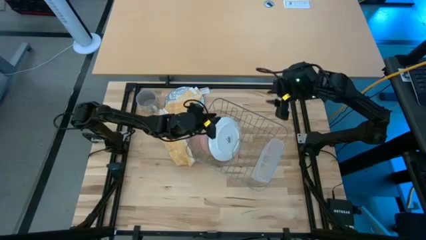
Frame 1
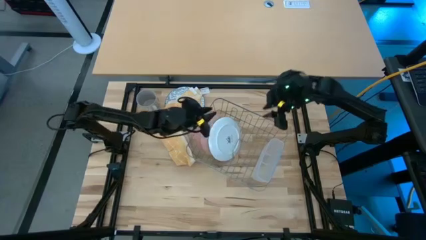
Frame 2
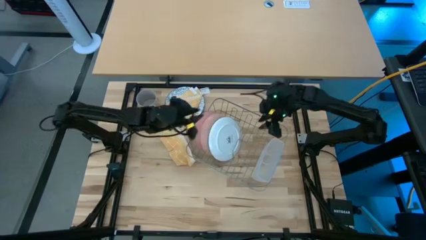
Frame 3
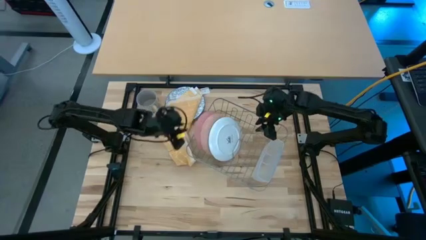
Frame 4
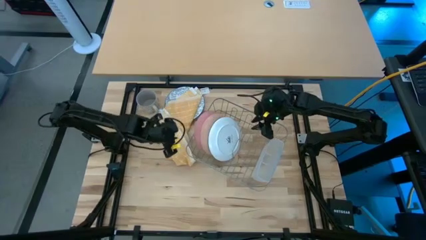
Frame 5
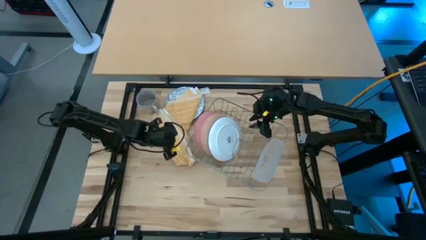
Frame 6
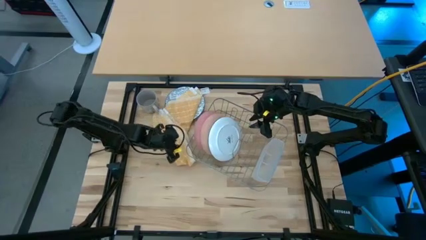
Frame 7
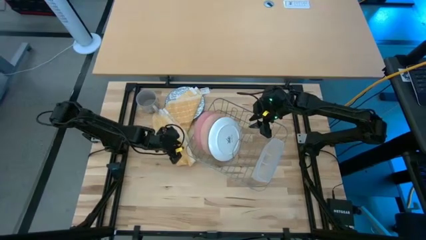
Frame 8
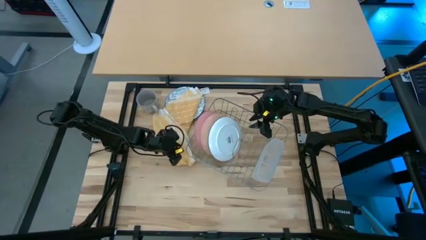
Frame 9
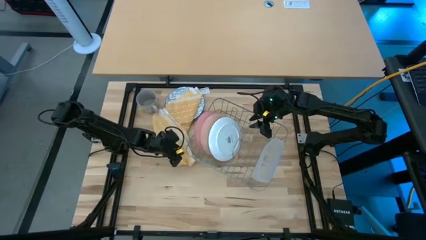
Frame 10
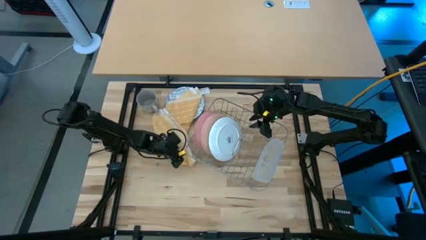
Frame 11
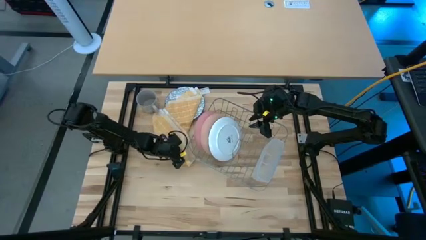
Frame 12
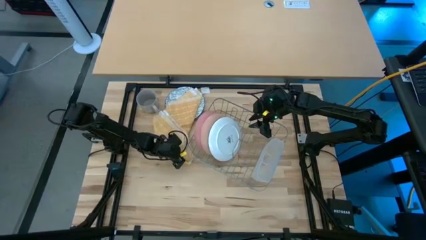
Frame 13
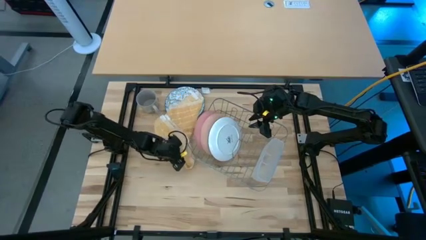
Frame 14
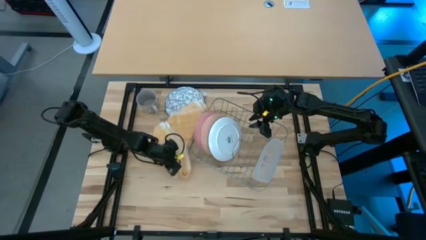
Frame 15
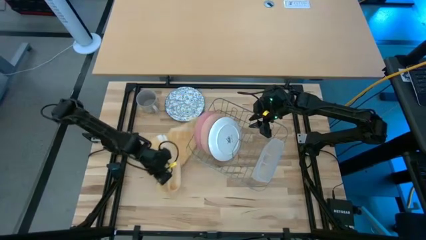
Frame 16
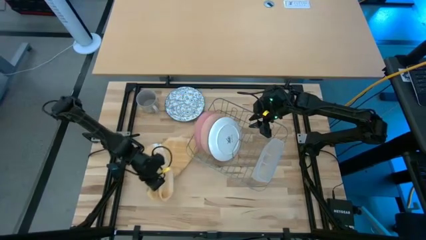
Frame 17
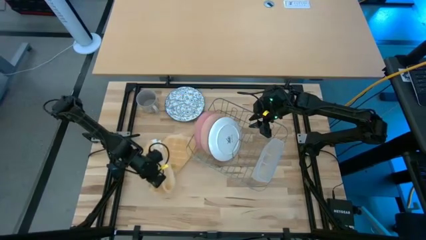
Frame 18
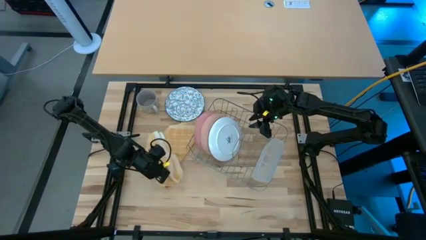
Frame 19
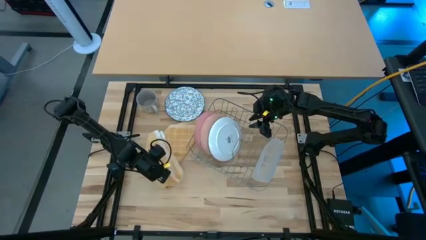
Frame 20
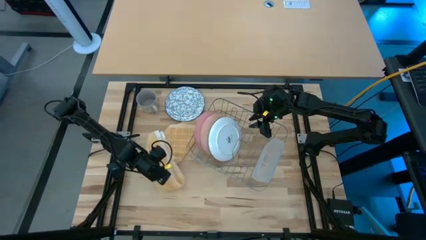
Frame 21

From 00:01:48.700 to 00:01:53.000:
Task: Sort dishes
Adjust the orange kitchen towel

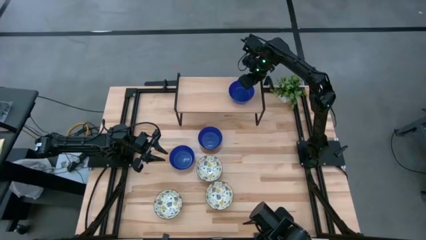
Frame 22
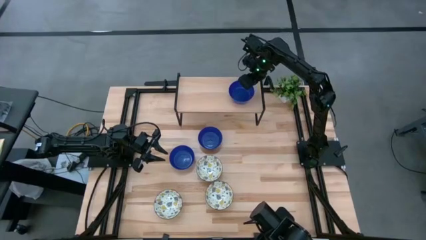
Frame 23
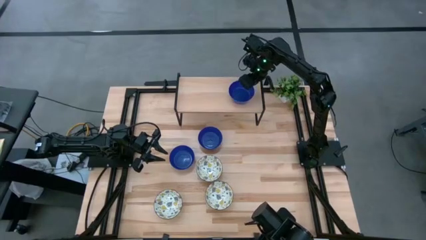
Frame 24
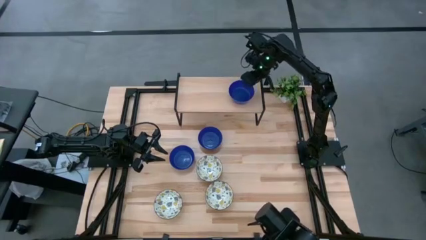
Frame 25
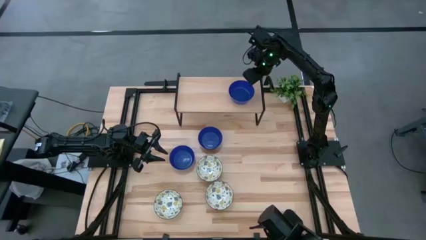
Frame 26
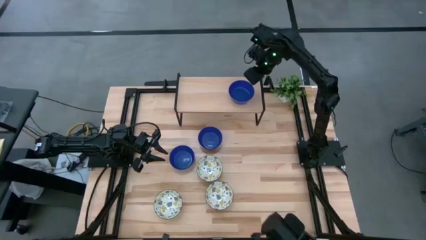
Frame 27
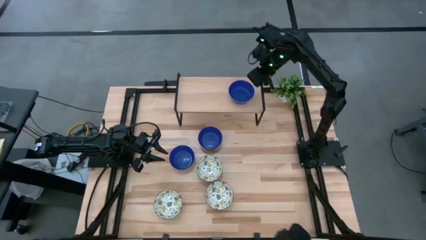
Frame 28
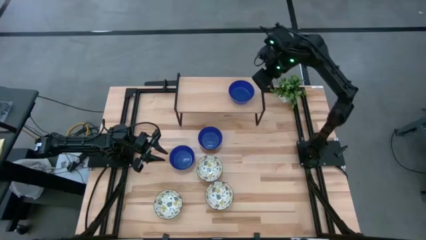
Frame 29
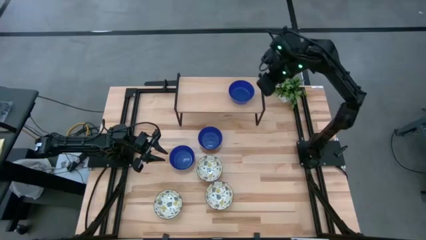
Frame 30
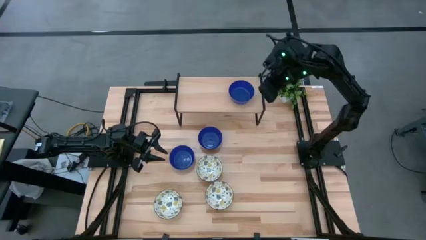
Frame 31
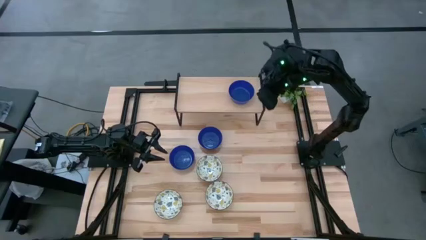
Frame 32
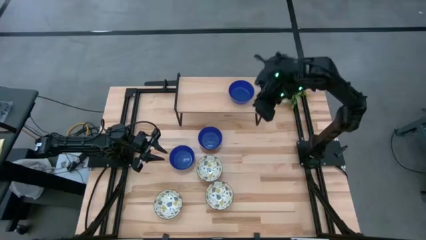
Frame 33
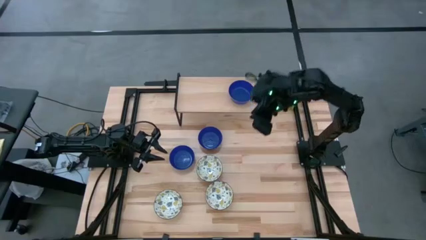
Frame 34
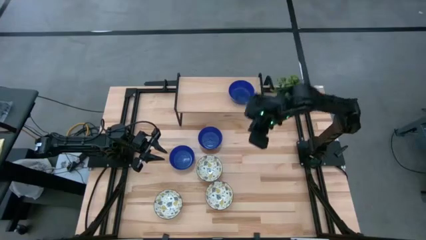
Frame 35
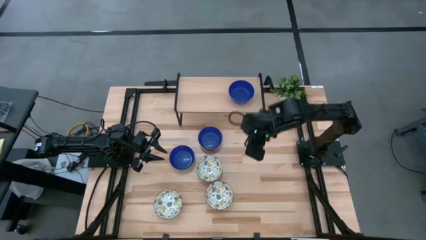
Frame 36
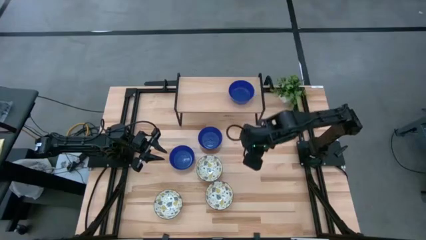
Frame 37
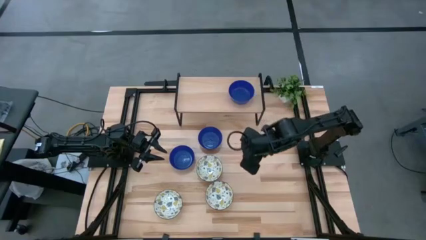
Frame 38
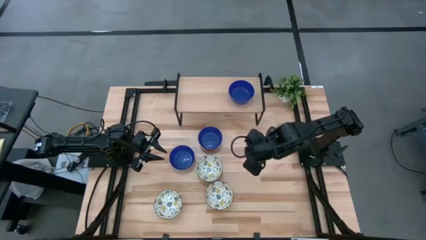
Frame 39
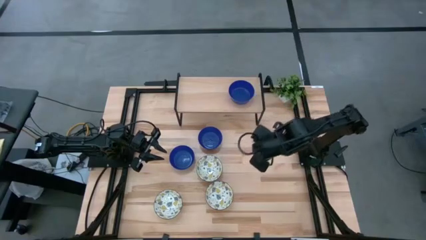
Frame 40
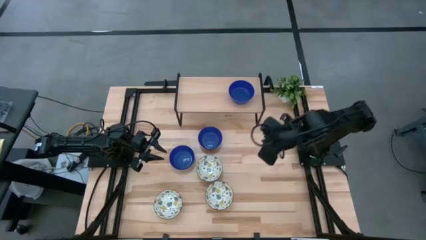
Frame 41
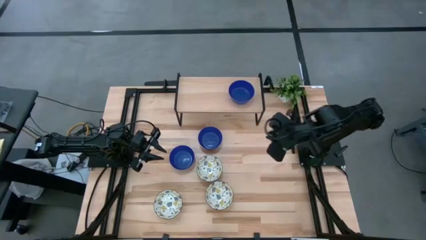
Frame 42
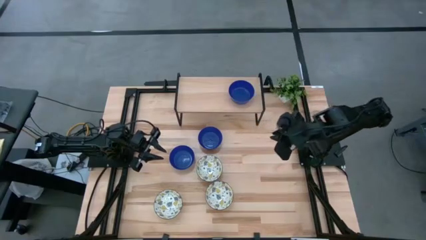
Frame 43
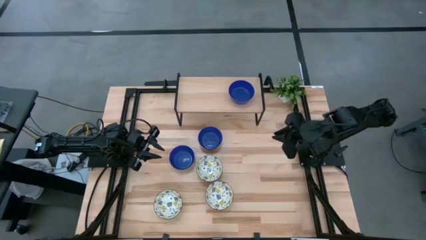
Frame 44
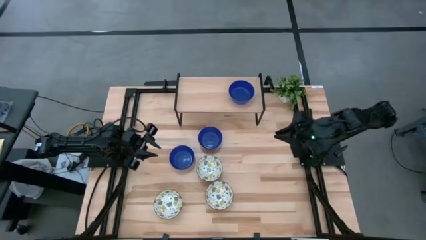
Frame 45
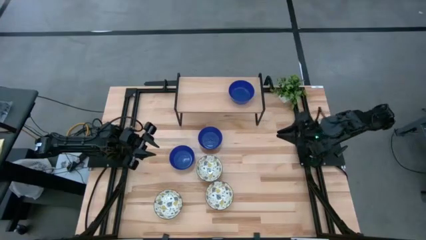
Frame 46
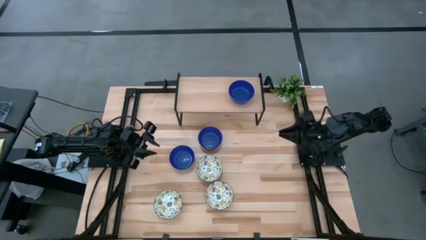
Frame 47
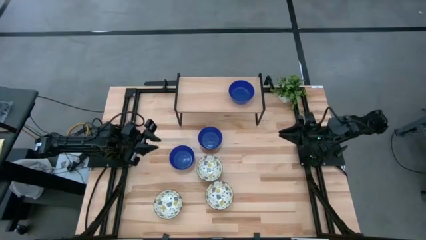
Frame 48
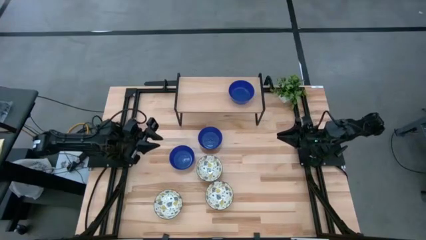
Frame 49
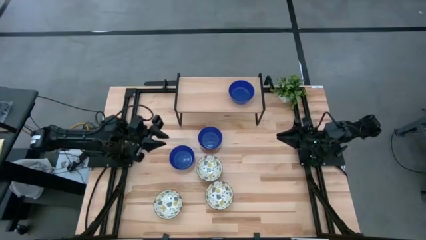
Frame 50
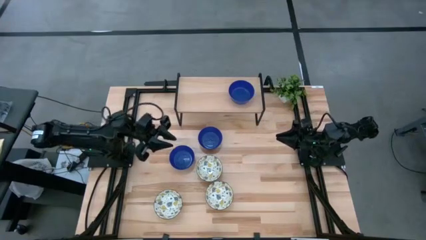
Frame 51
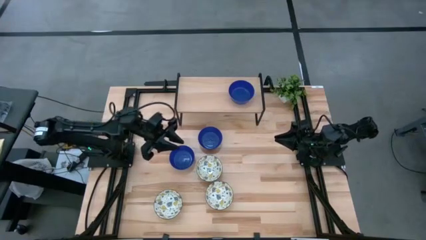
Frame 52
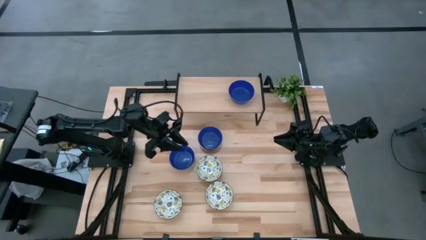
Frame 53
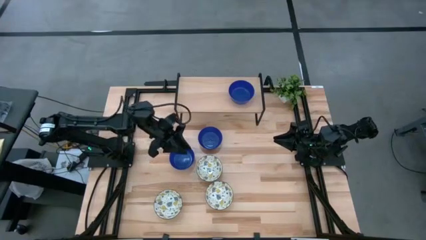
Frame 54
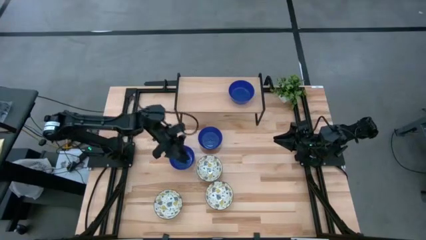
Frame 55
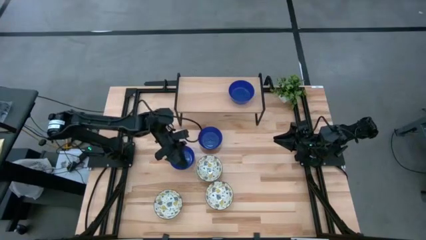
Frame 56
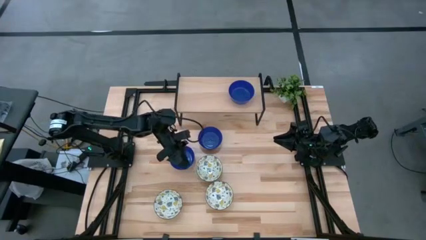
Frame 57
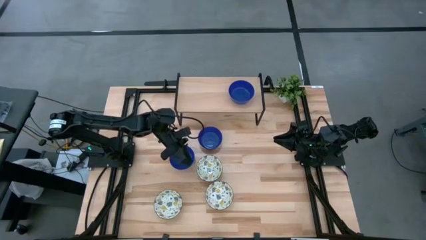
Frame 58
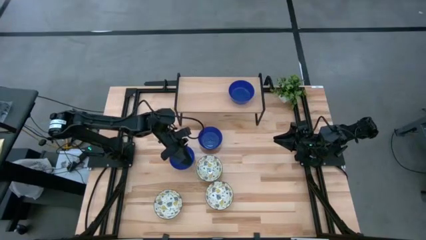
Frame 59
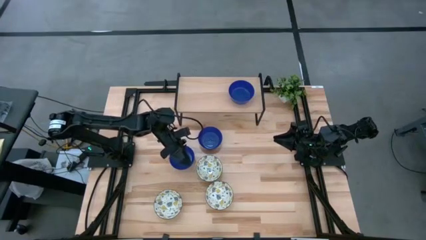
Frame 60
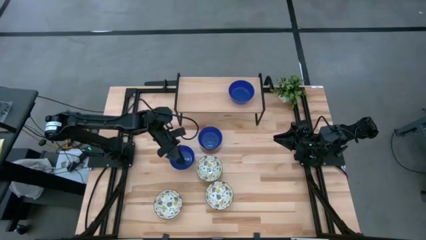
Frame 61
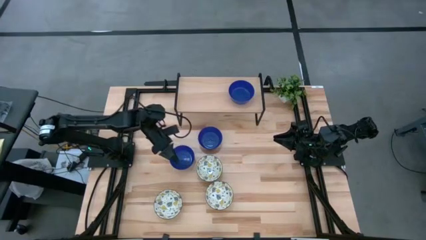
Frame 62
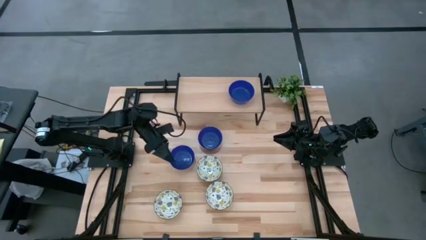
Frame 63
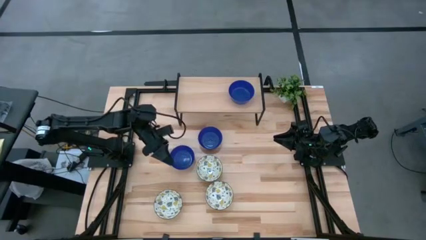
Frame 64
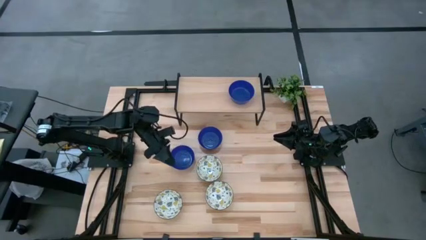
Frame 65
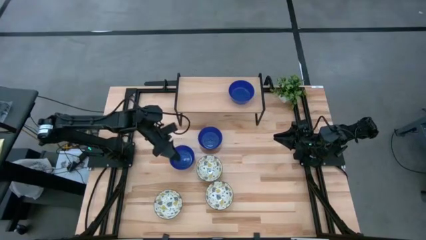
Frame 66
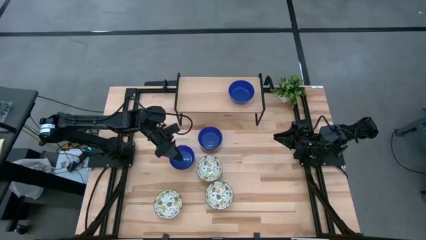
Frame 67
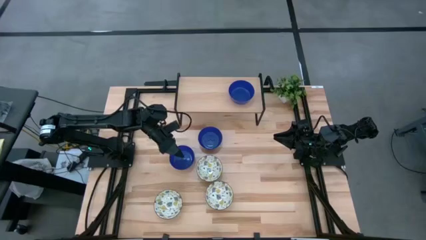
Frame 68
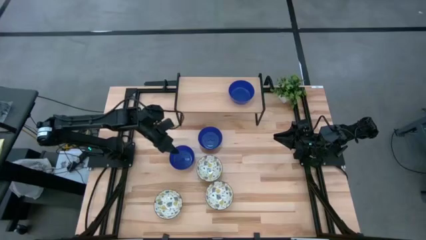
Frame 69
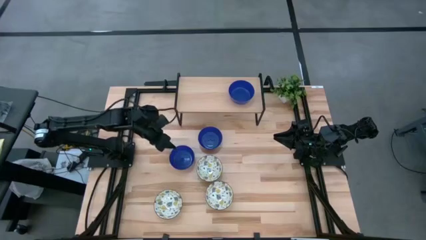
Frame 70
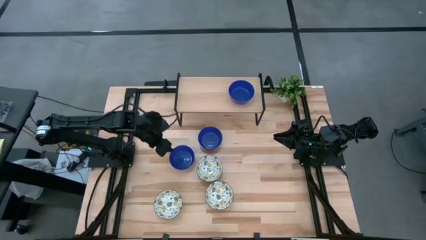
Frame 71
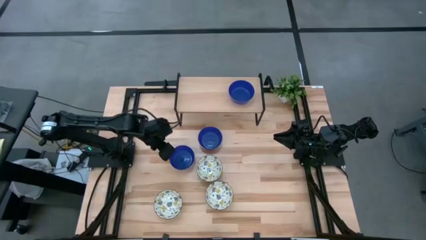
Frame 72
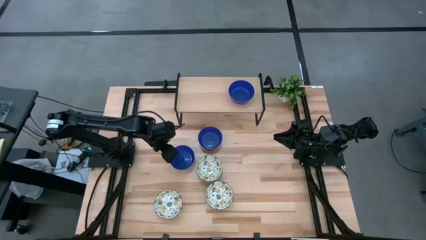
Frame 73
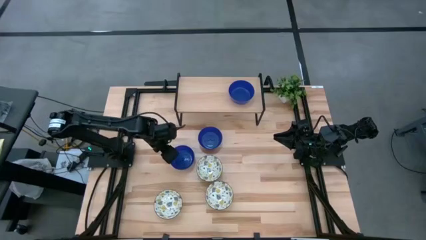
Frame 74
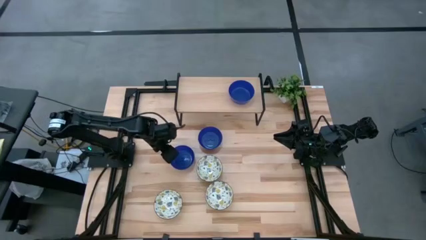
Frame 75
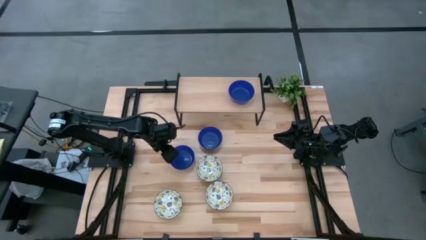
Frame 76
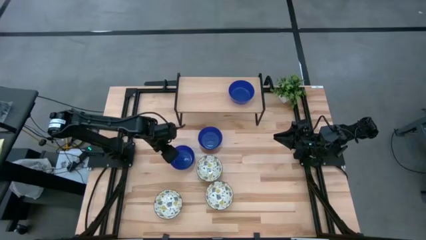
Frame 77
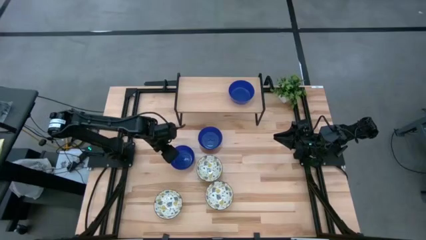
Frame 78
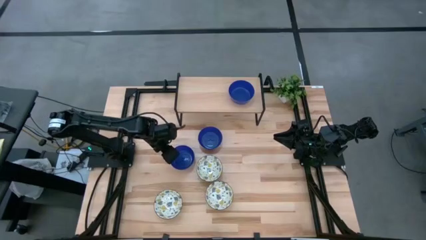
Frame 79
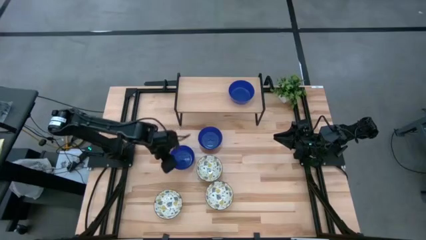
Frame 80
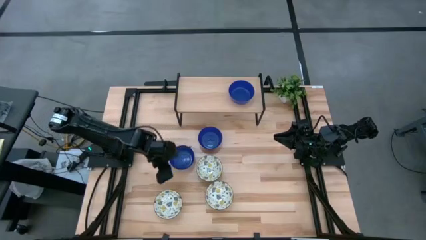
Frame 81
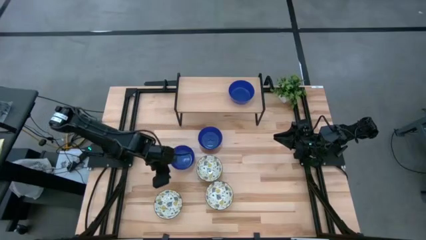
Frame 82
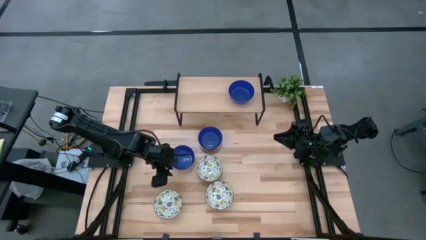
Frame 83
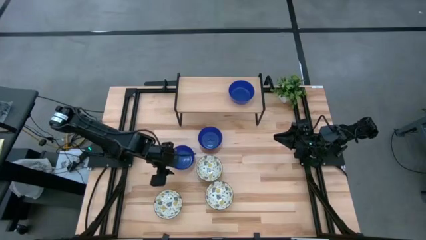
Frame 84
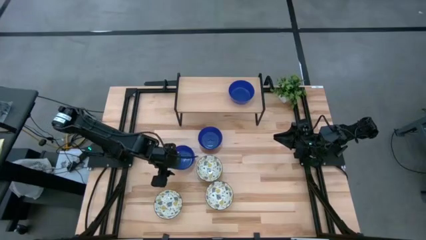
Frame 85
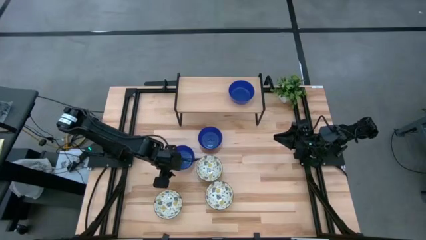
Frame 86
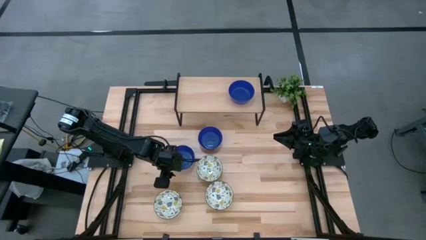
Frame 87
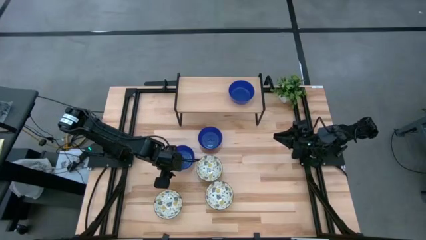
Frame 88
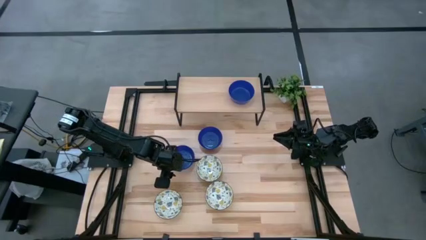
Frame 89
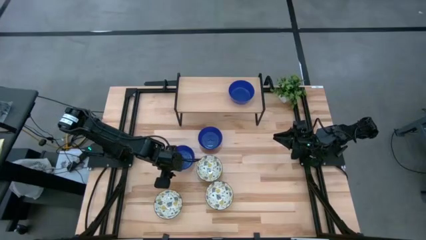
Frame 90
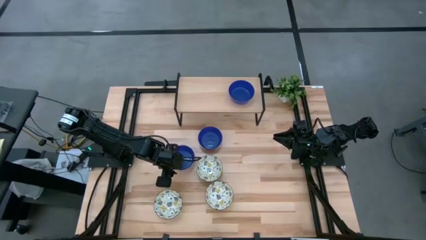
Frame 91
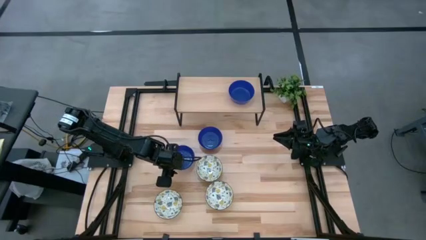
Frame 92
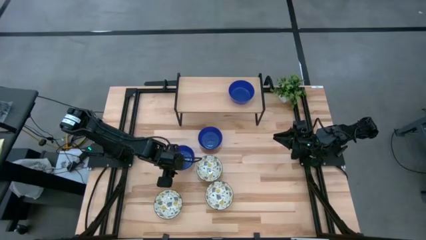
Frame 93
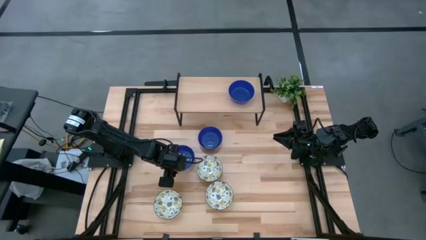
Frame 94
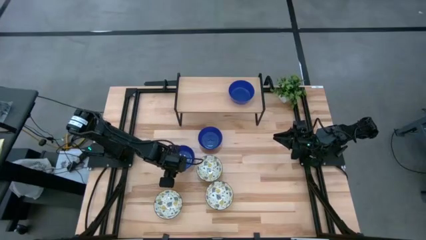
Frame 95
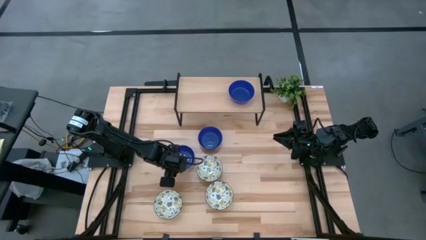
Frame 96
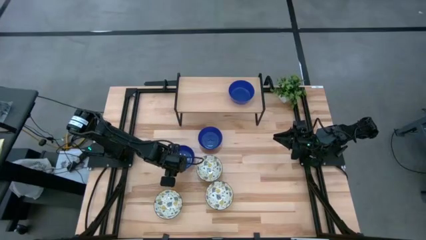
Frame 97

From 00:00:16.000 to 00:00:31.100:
Task: Pick & Place Mini bowls
Stack the left blue bowl on the blue bowl on the shelf
